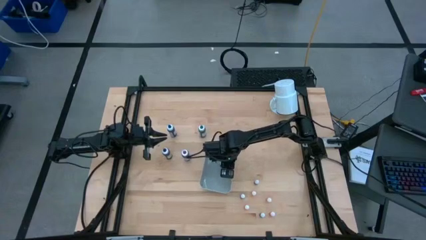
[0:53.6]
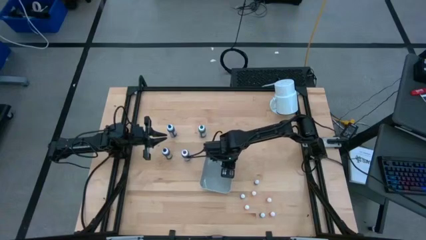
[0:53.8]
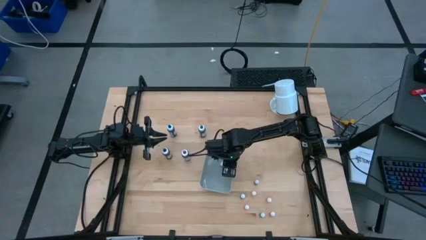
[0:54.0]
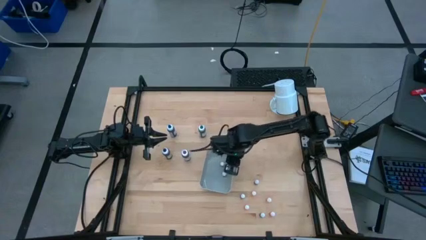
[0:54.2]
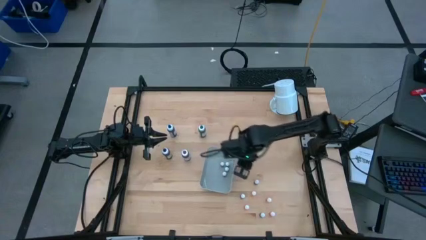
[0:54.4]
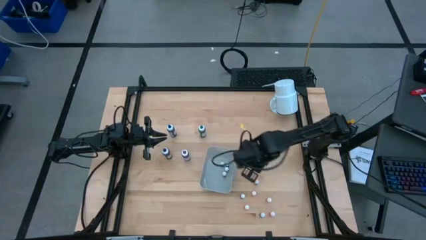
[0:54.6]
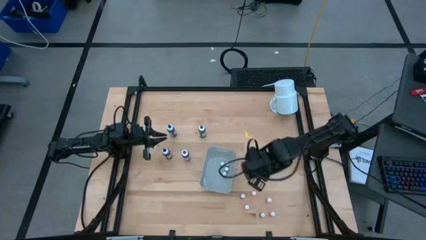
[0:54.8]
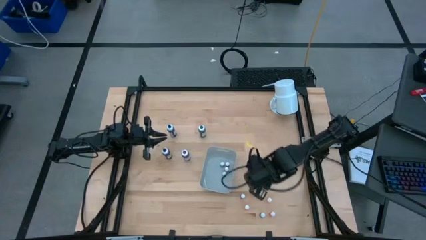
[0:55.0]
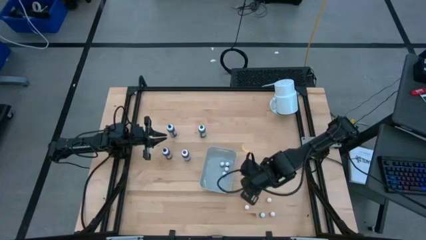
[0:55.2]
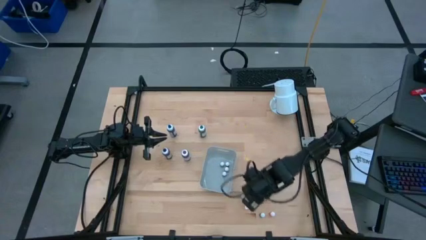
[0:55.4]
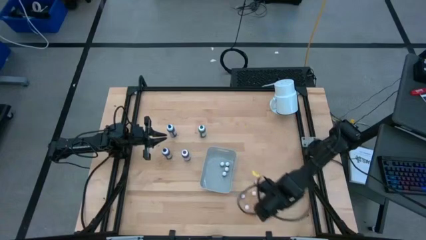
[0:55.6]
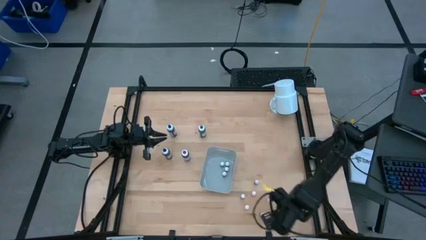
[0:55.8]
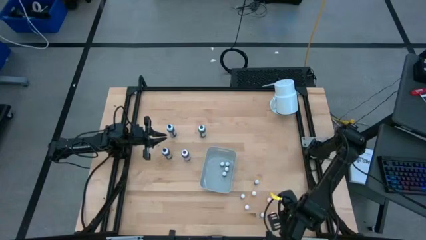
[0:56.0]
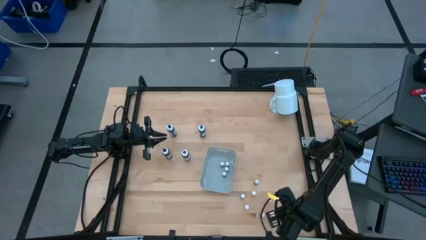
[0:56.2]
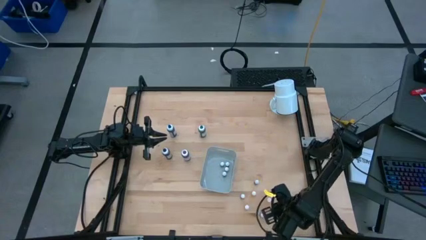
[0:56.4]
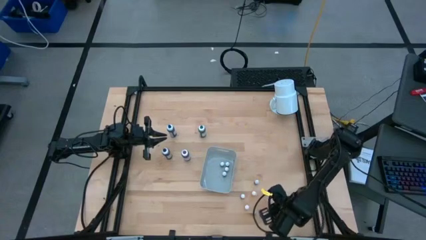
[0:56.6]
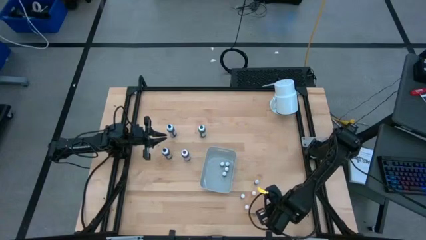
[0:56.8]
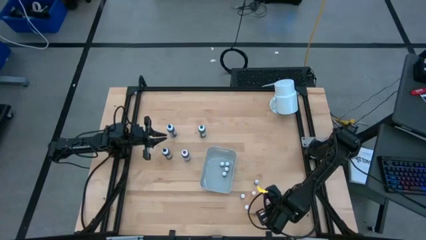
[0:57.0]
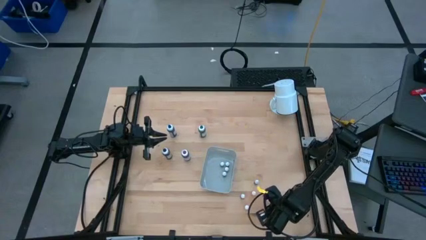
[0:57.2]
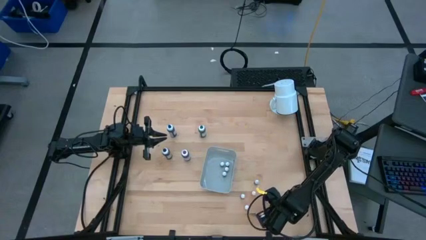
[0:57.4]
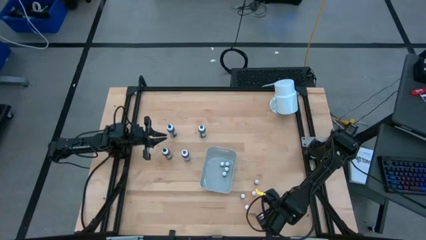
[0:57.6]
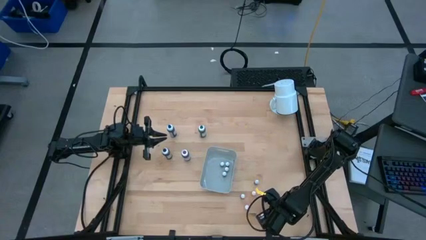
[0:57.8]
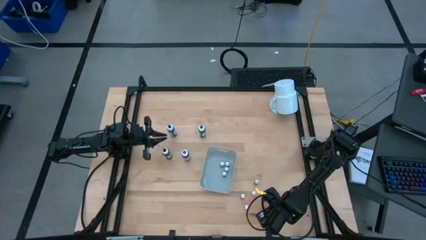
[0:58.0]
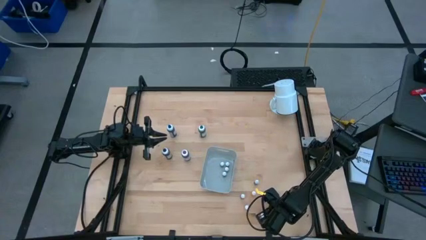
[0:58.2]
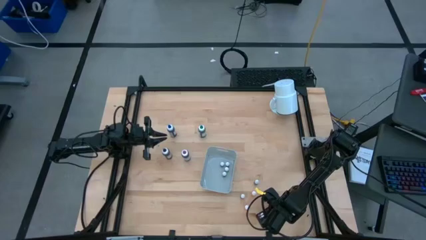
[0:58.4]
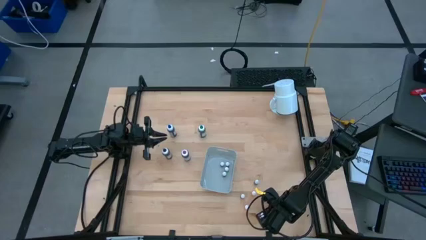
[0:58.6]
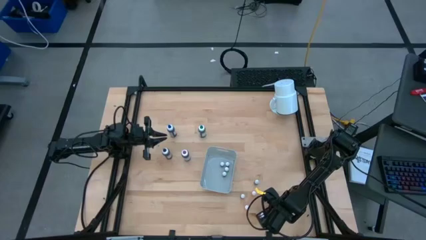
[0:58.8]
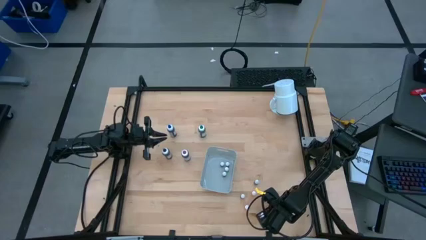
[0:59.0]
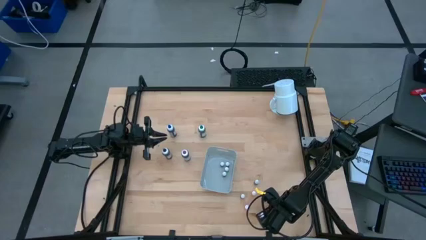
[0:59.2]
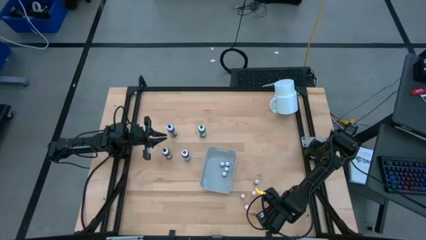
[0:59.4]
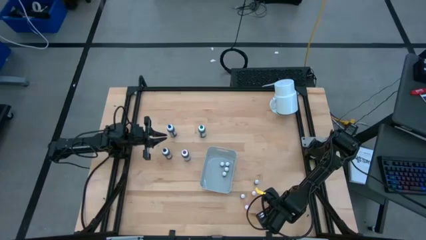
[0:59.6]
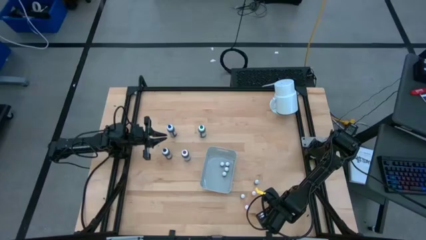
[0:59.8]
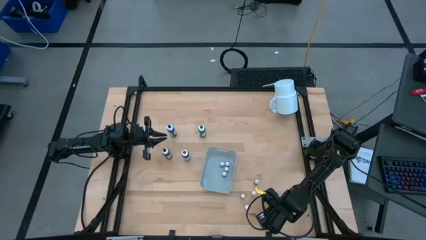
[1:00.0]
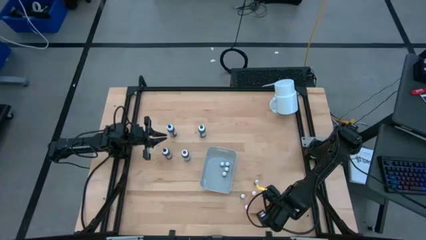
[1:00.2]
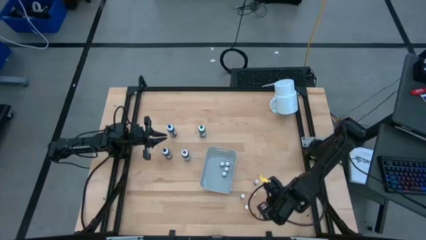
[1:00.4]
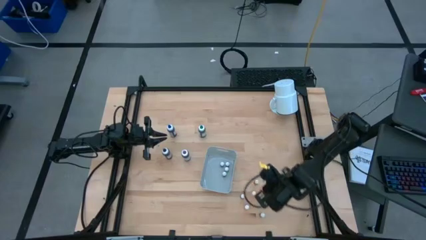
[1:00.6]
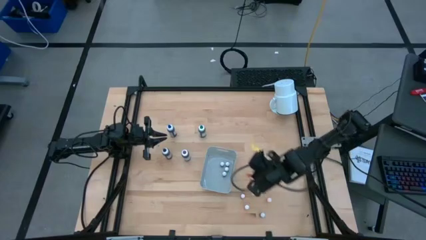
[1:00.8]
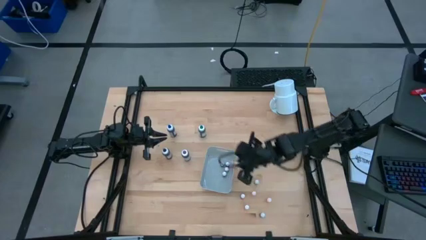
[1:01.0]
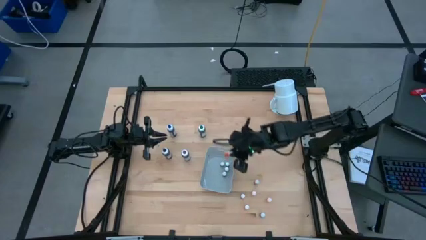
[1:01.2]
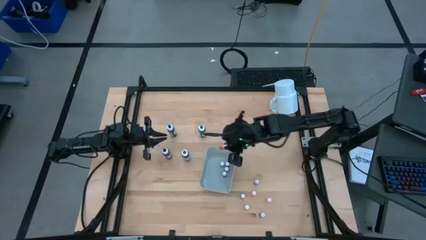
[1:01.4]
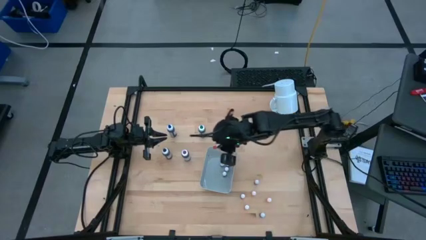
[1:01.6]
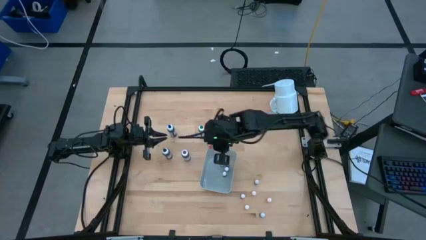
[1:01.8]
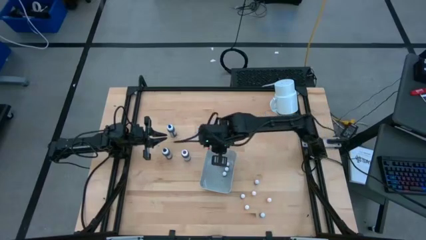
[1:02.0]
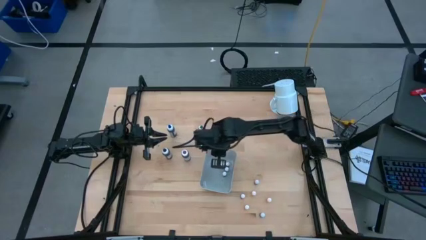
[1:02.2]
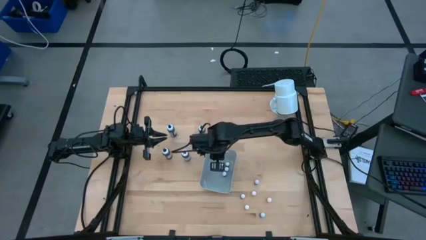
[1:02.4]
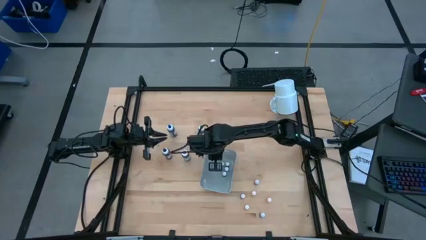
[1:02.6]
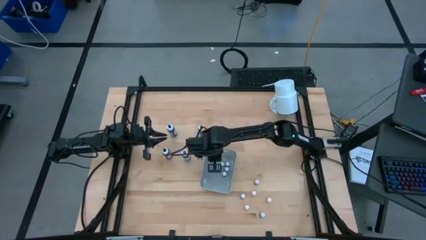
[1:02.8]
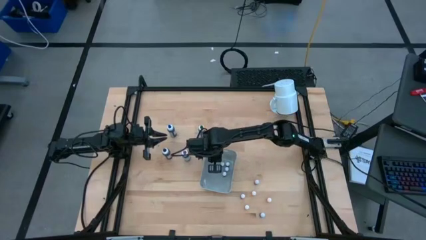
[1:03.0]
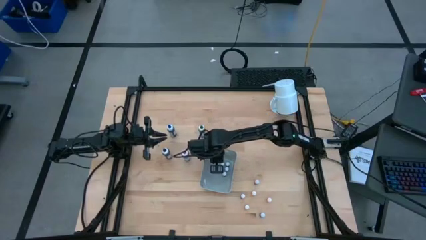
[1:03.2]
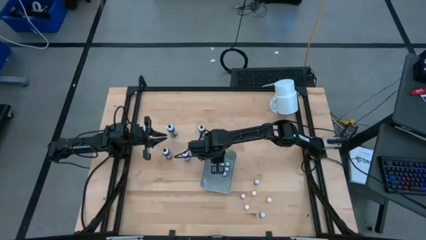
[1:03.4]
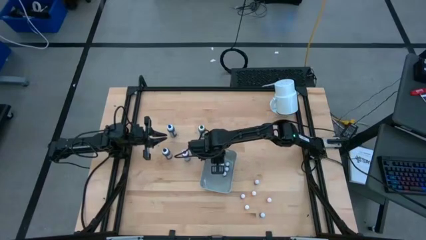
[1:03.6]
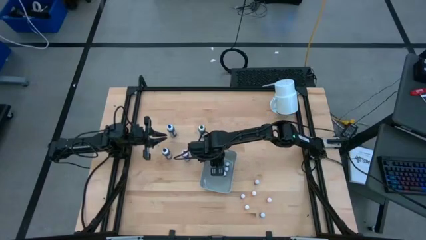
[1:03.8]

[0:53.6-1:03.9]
Task: Pick & Place food coloring
Put the small yellow food coloring bottle into the white bin

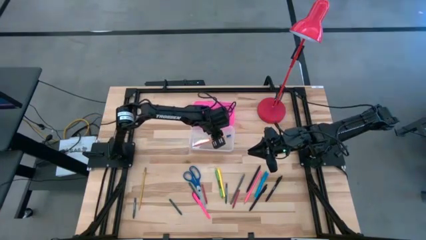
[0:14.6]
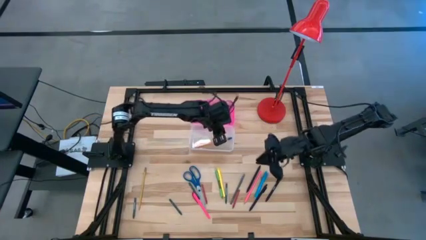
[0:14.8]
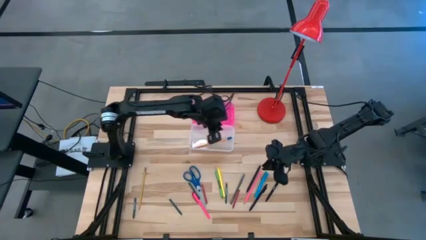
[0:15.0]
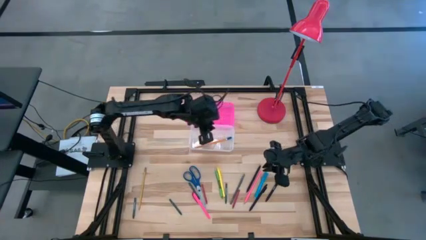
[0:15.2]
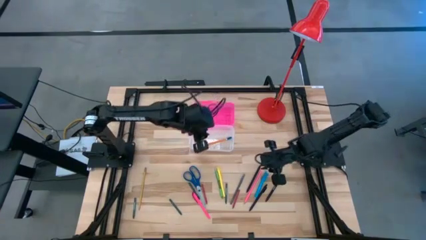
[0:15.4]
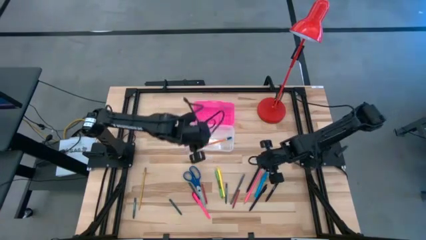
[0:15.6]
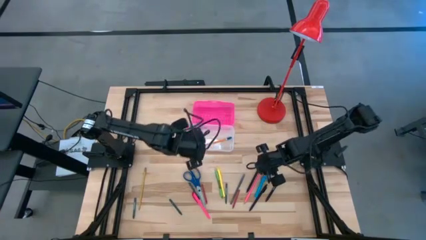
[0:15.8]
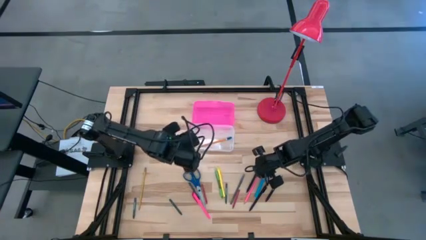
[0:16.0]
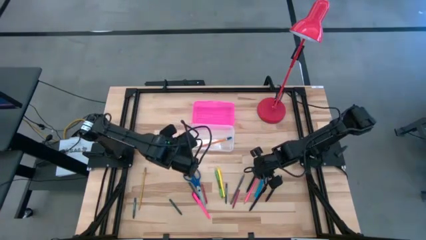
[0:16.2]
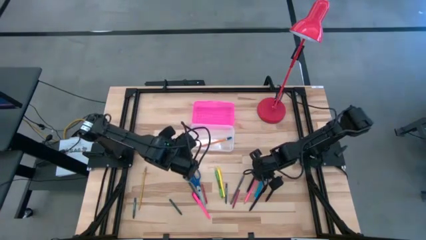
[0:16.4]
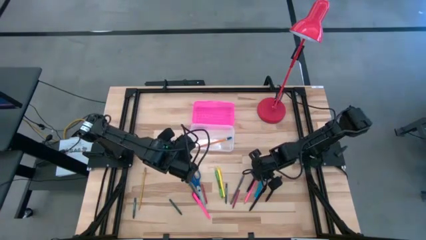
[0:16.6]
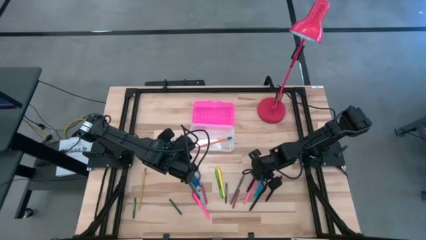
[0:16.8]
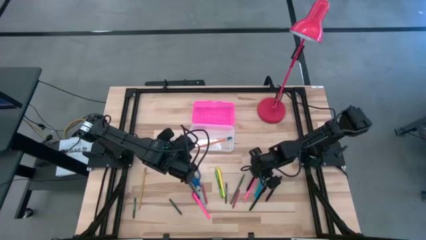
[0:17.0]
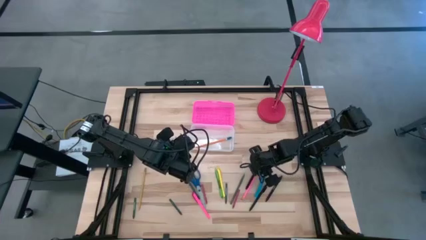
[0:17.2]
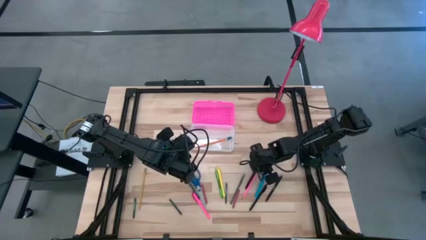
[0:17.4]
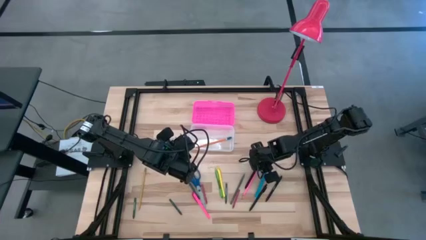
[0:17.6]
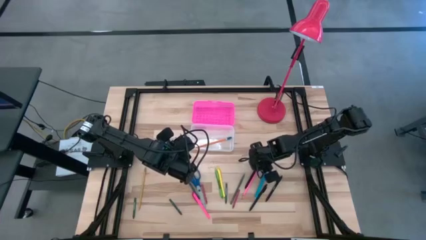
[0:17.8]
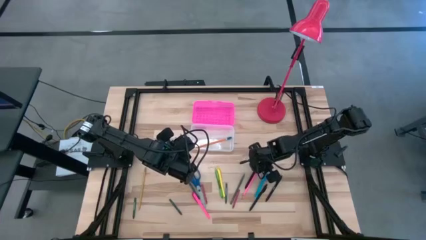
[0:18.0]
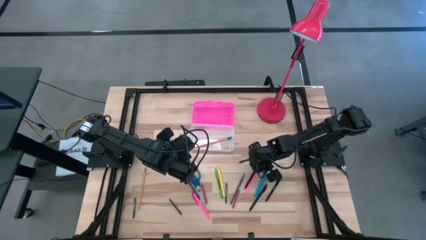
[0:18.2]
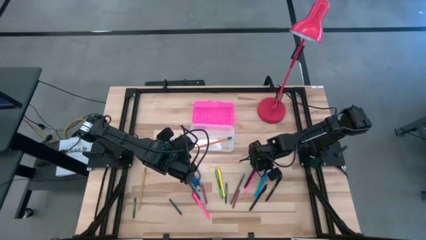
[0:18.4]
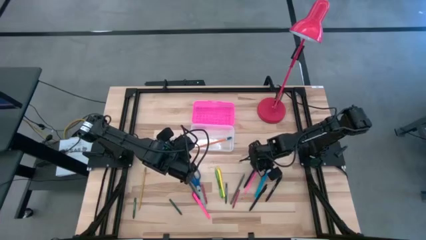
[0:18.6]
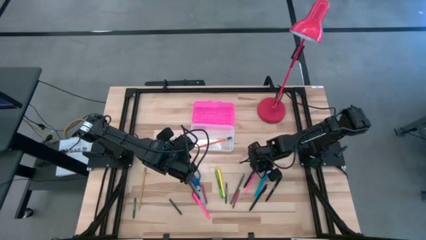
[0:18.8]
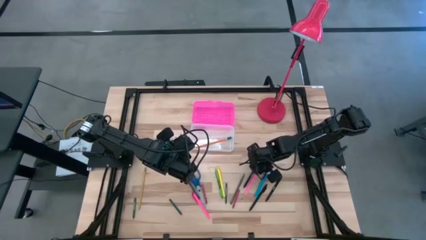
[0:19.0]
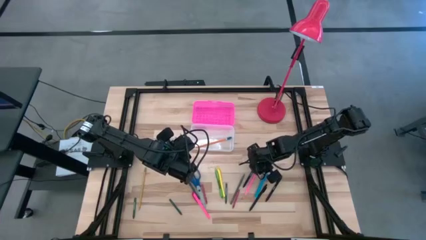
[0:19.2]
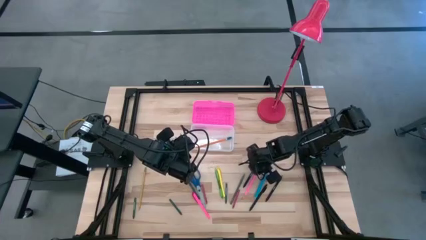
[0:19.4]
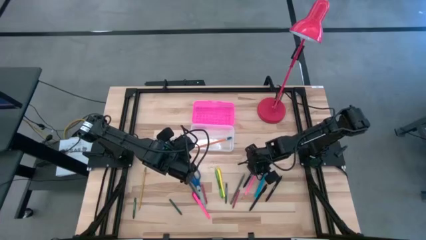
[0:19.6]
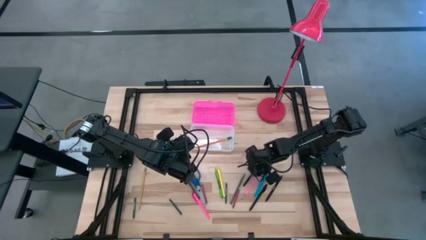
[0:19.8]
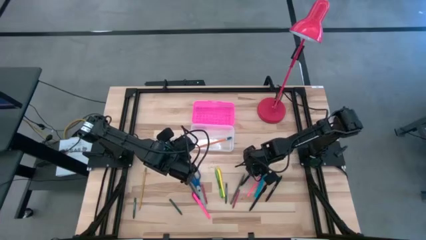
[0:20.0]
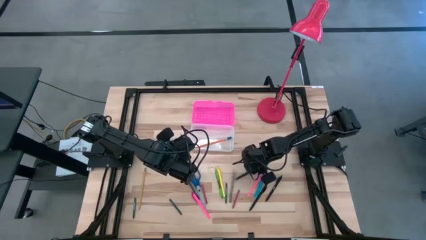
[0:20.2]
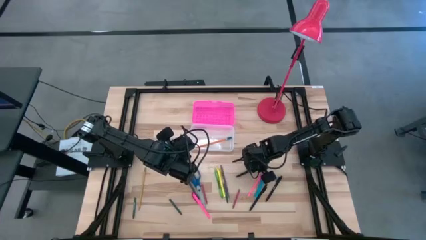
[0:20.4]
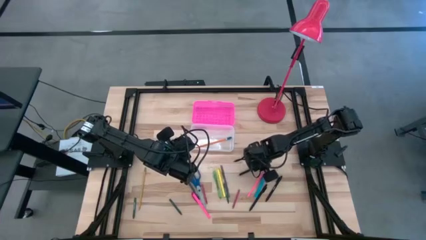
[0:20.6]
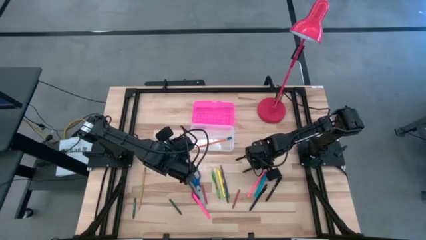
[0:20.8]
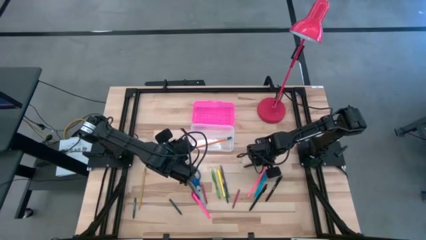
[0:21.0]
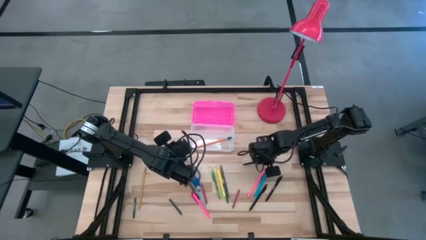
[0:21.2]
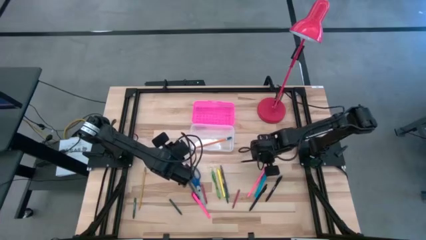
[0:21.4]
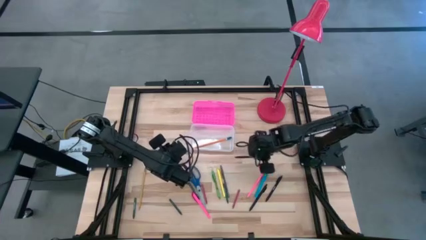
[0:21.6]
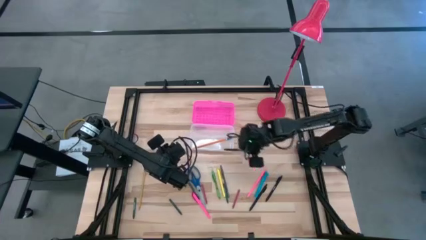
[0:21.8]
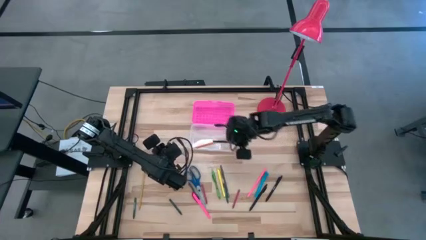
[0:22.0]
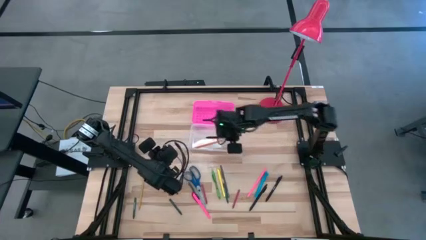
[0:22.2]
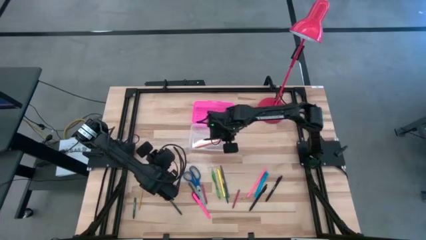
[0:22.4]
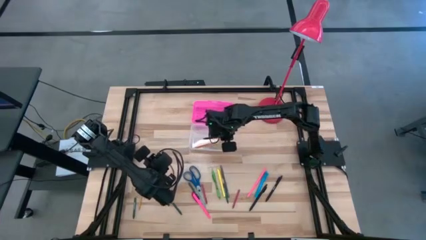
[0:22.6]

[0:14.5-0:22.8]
Task: Pick & place school supplies into a supply box
Put the black pen into the pink supply box
